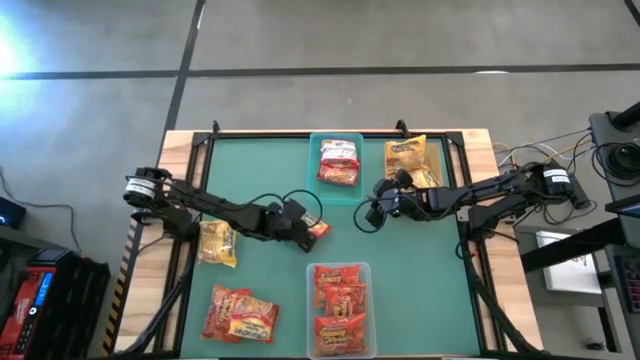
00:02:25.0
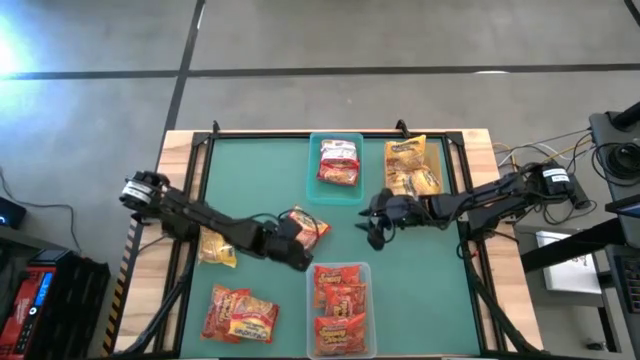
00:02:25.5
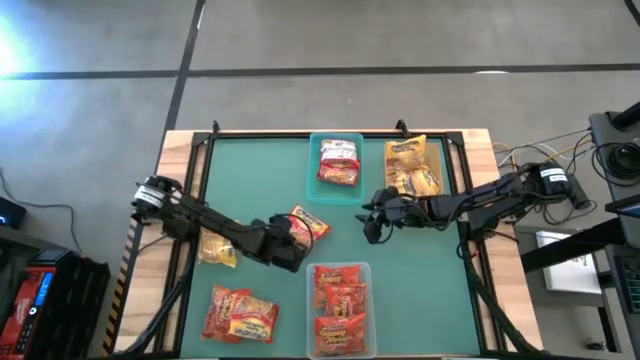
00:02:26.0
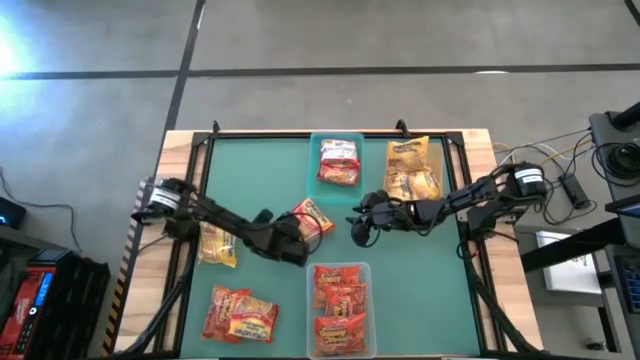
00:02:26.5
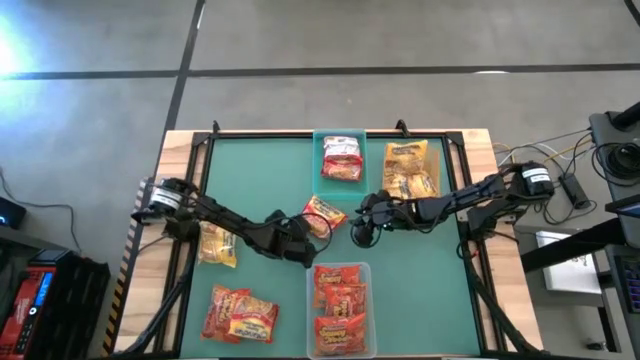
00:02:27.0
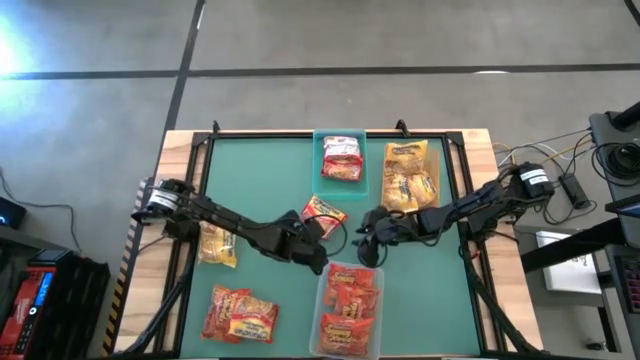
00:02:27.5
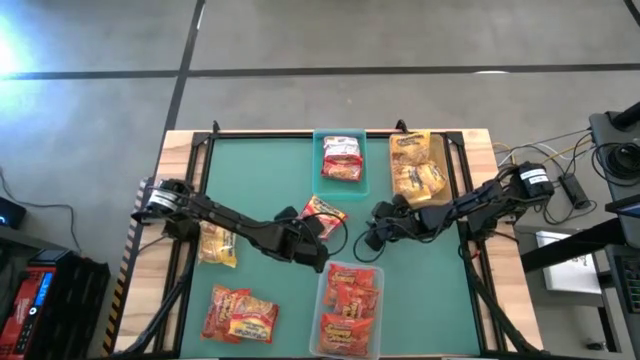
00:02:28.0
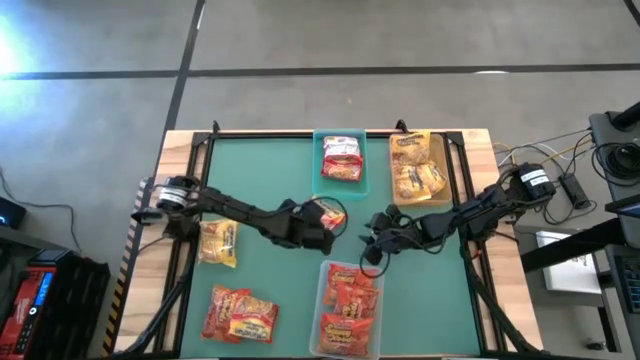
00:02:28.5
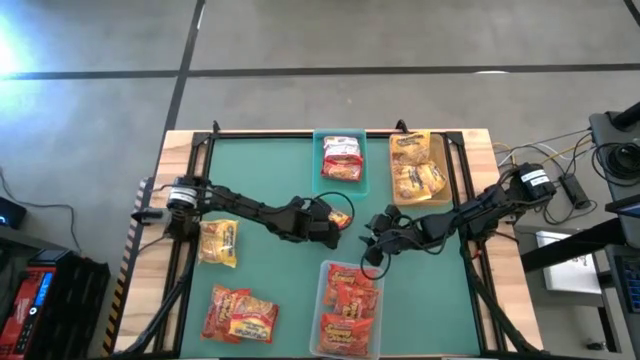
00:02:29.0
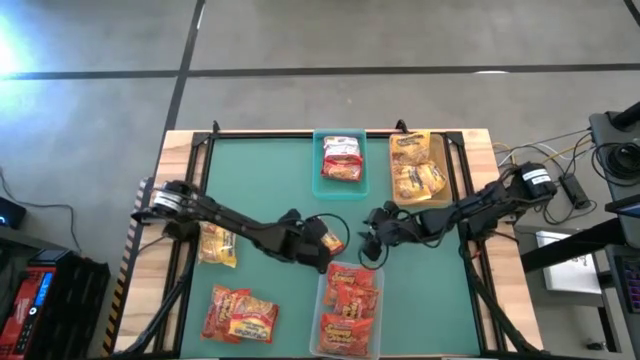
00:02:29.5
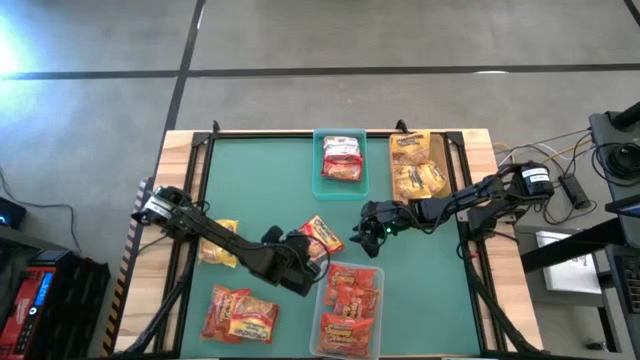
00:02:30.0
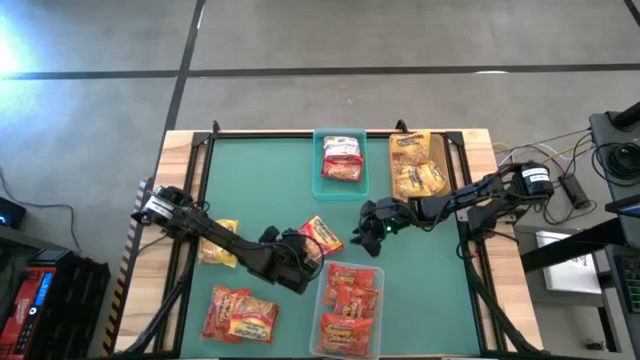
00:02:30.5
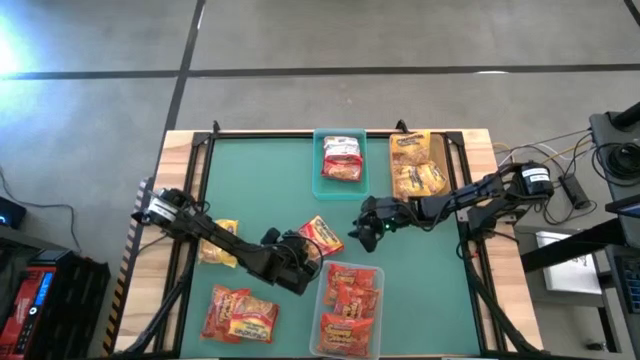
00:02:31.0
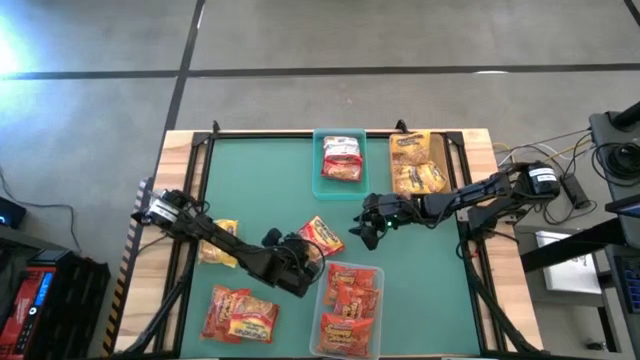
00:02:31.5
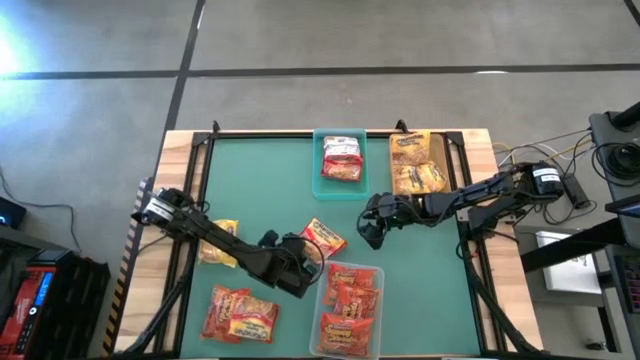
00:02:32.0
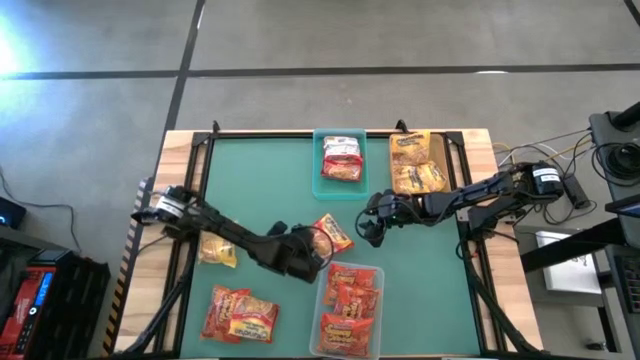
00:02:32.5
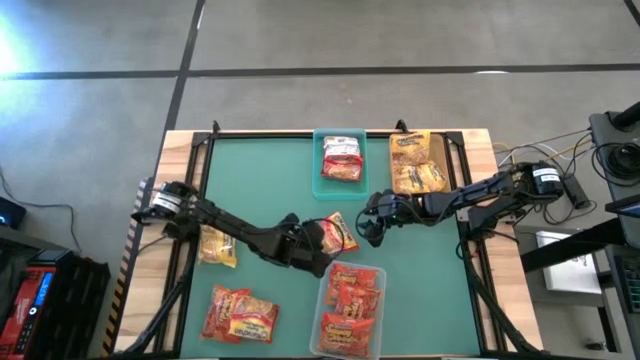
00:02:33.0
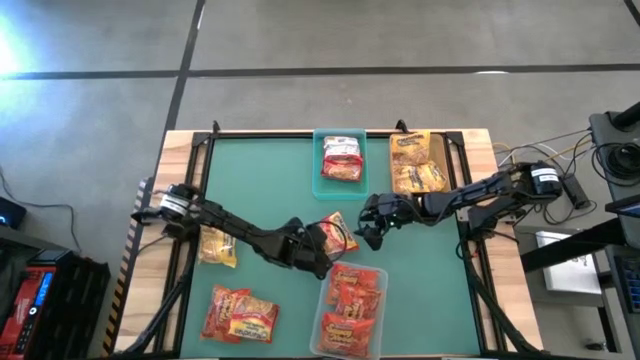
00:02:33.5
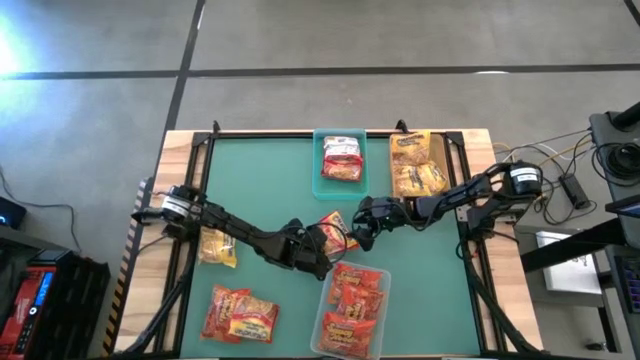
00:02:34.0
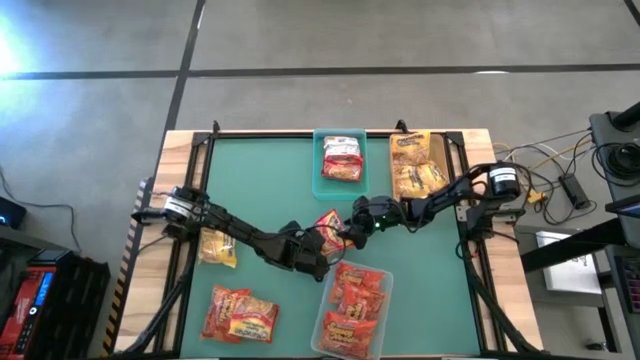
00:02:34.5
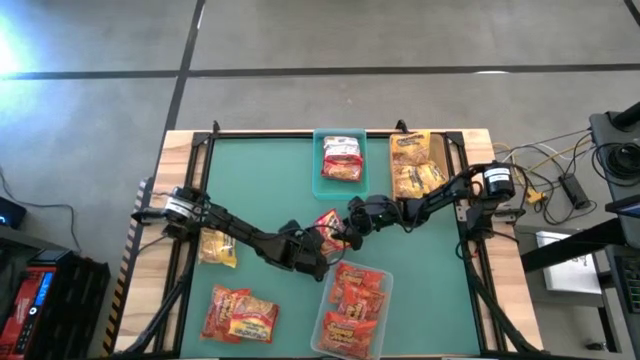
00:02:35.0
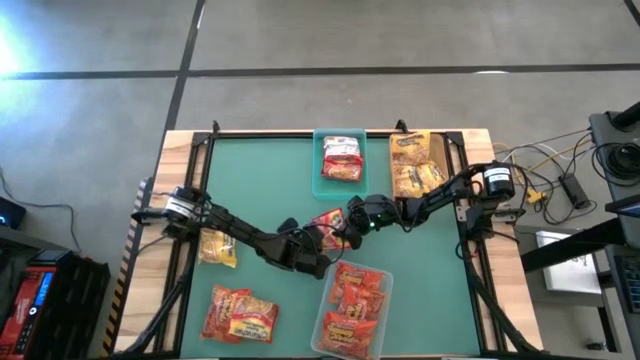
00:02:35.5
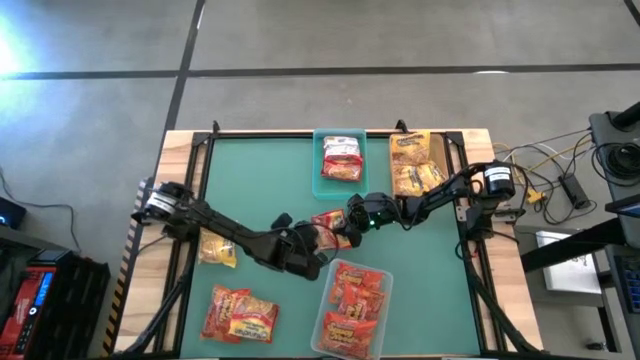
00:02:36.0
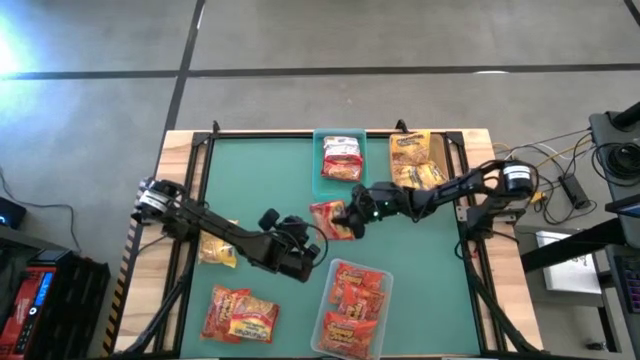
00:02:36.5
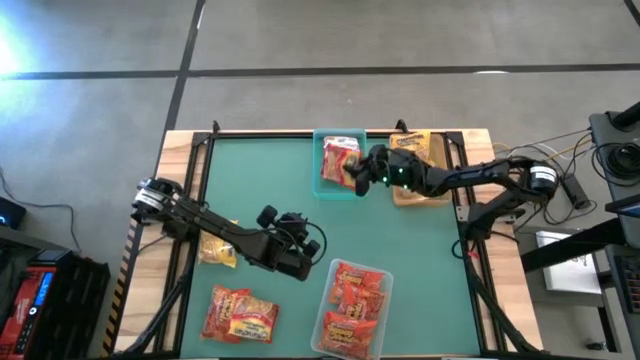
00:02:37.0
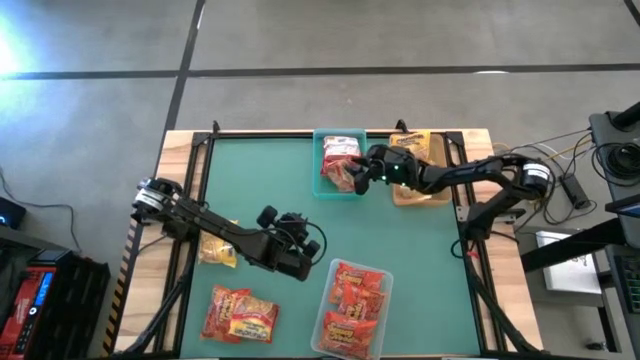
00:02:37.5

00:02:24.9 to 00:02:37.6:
Task: Sort Maruchan noodles
Put the top red noodle pack into the transparent green bin

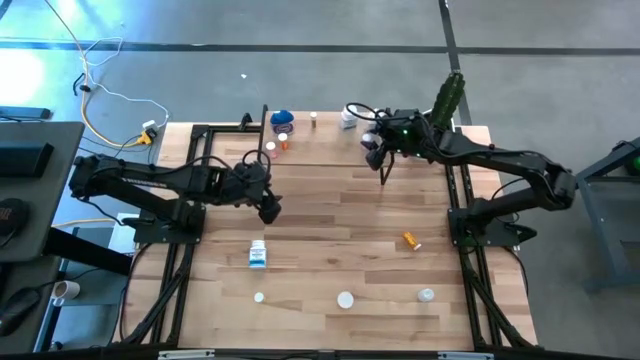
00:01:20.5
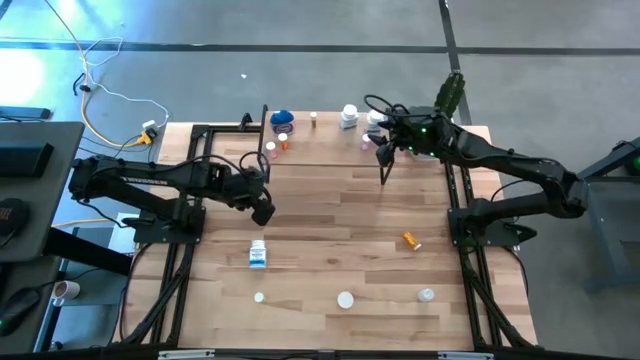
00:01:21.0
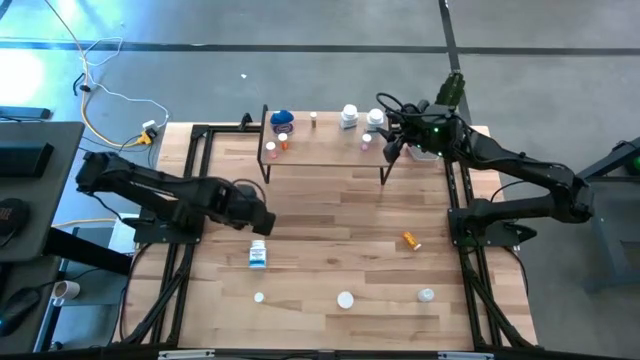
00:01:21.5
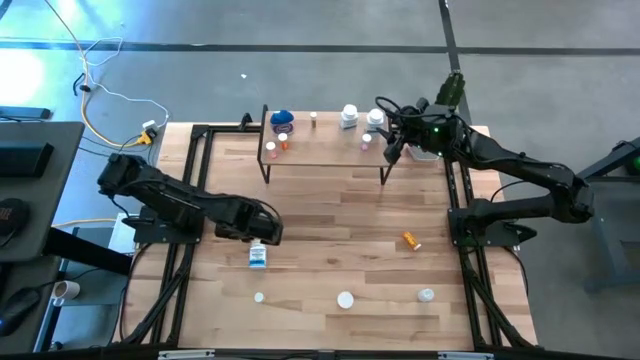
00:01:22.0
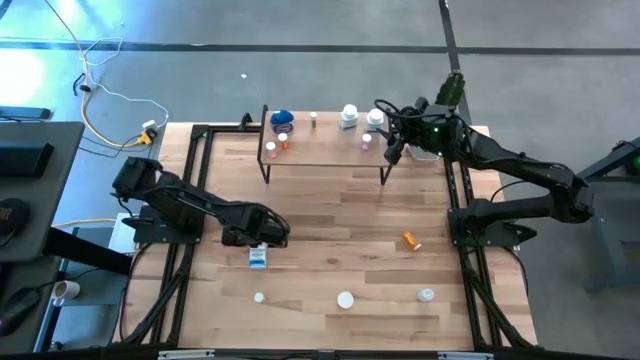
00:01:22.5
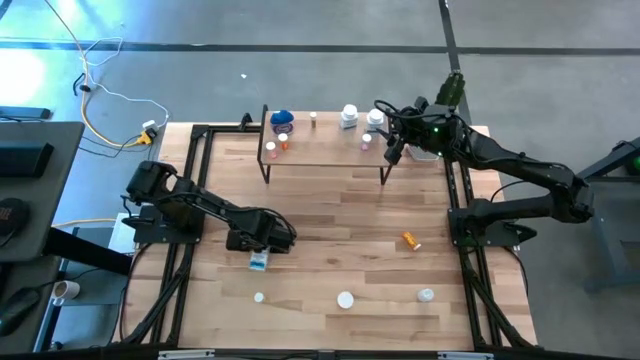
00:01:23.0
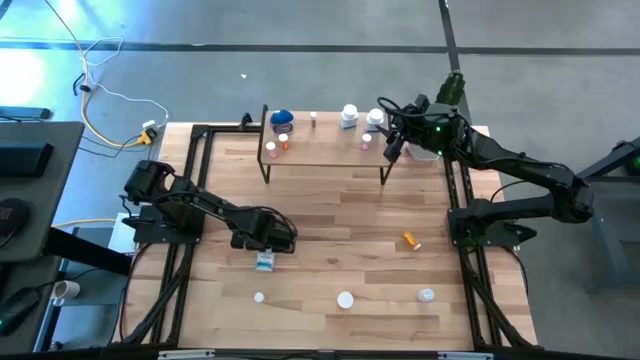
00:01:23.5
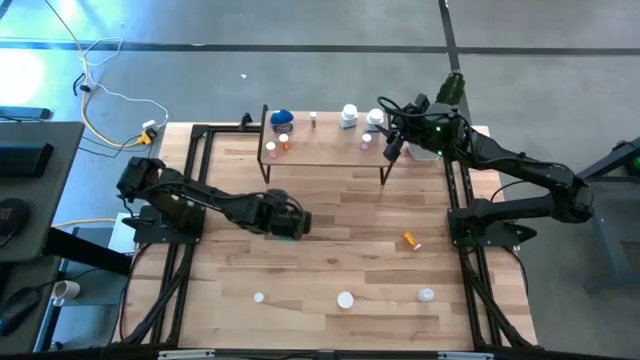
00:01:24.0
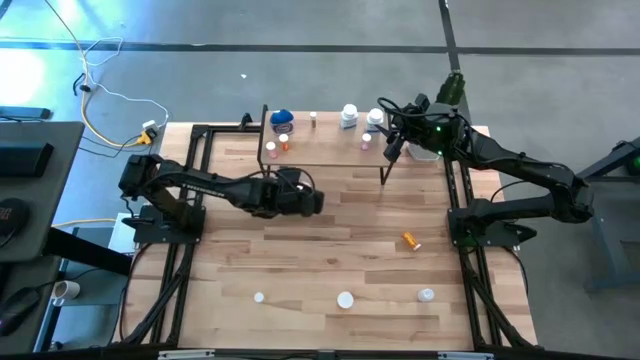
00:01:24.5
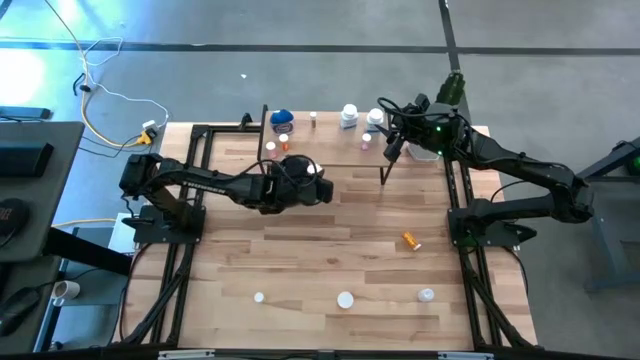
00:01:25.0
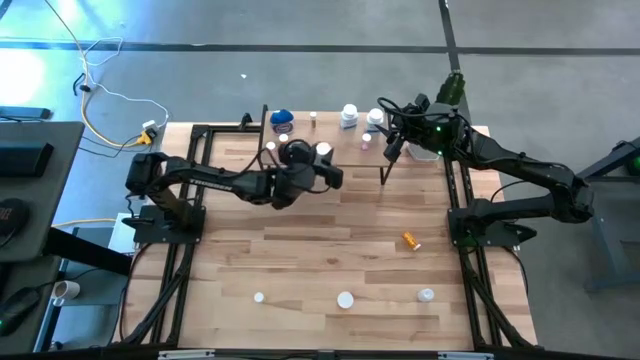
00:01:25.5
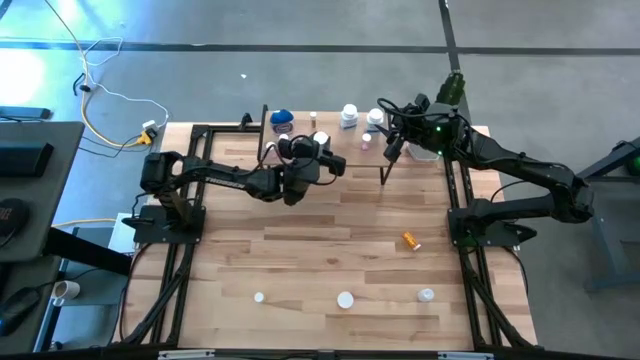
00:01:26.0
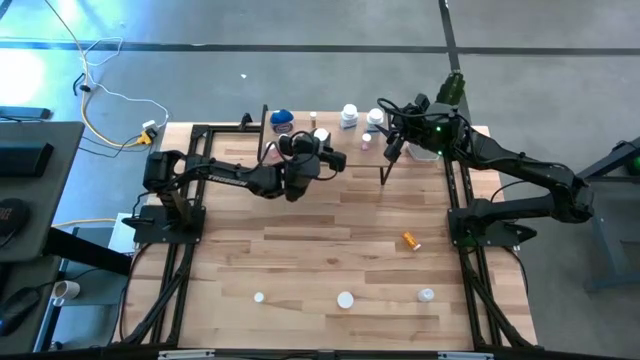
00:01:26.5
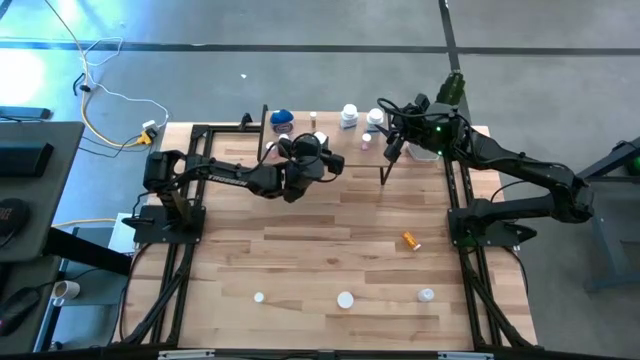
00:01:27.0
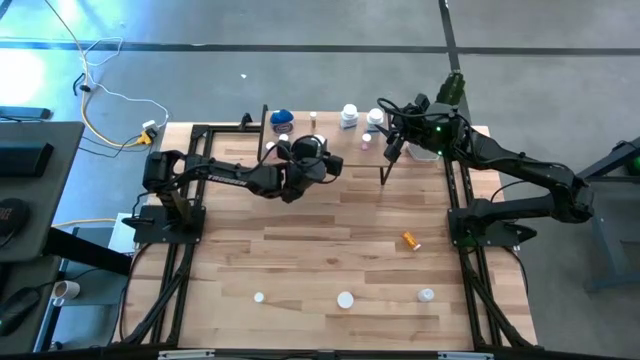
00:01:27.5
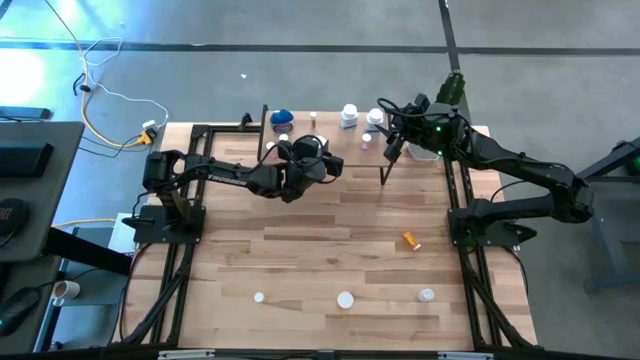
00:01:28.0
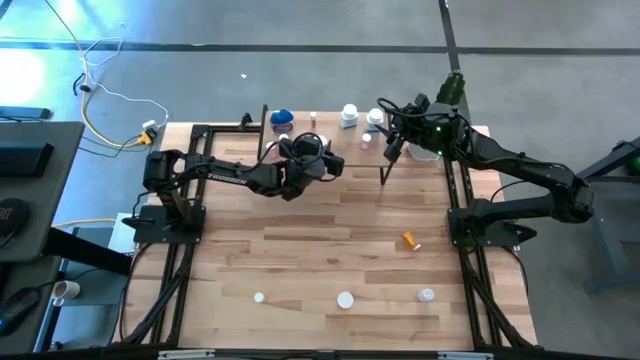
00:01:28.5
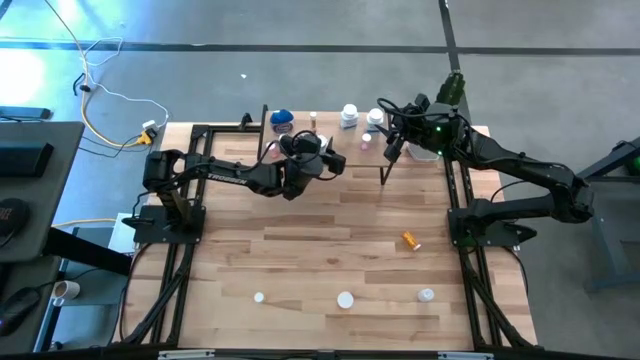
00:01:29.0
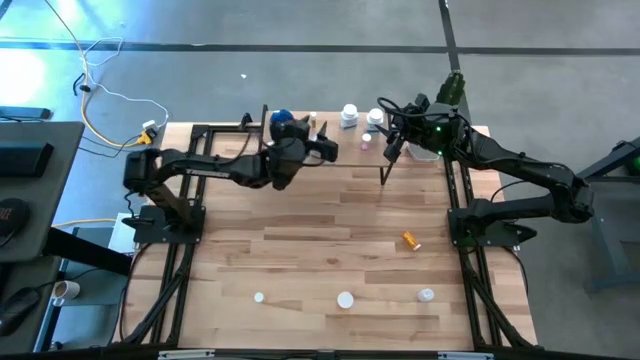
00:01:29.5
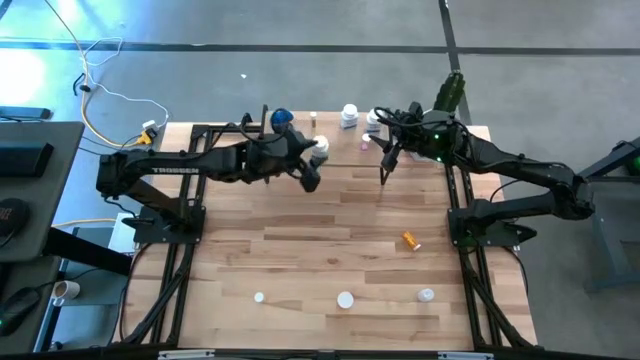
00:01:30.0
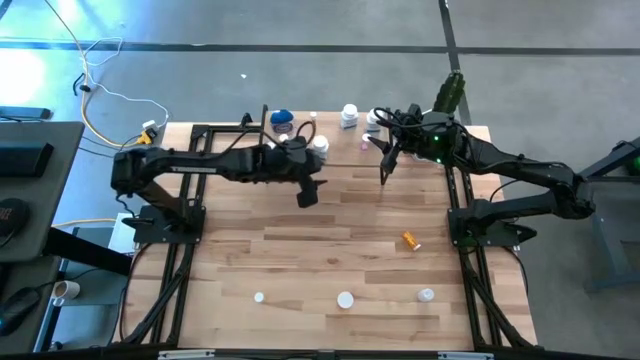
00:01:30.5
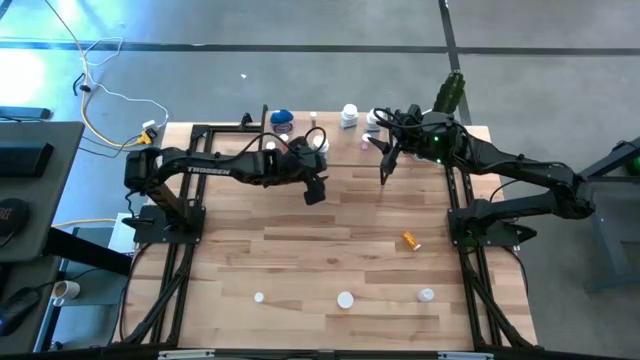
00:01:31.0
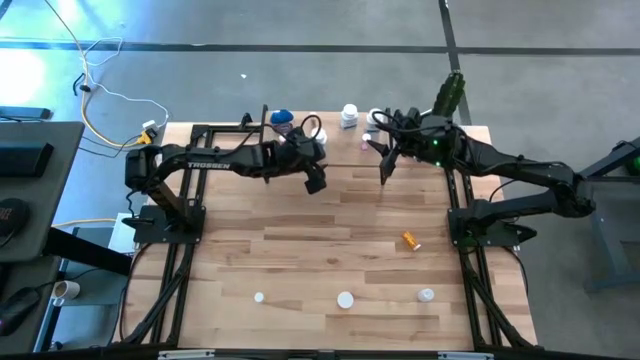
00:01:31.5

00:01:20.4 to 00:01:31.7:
Task: Pick and place medicine bottles onto shelf by color
Put the white pill bottle on the shelf
